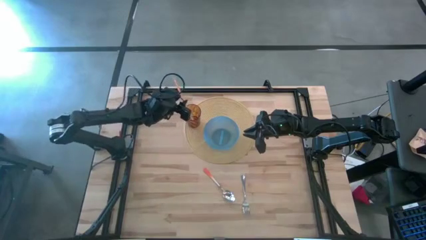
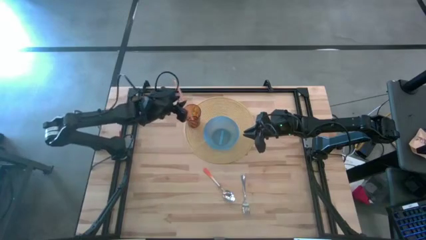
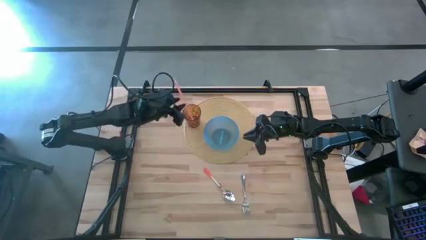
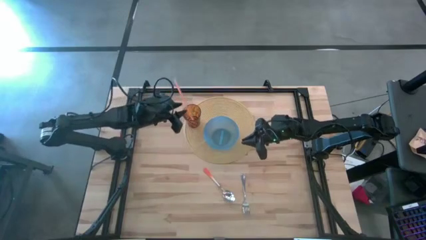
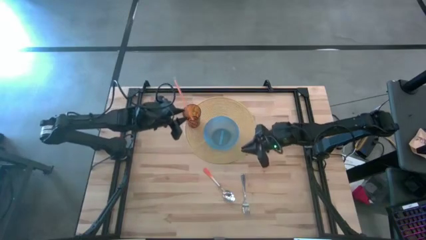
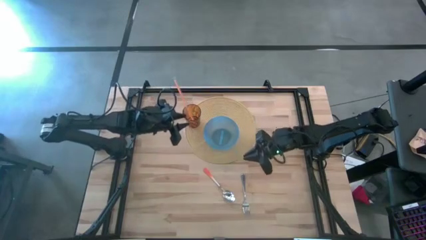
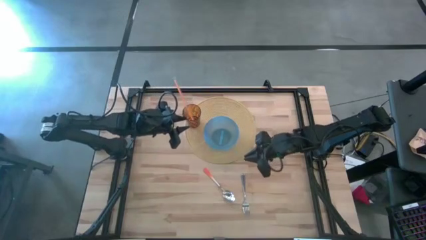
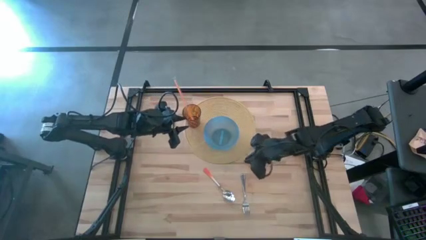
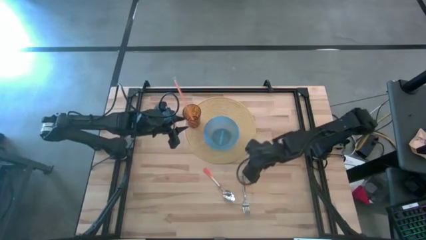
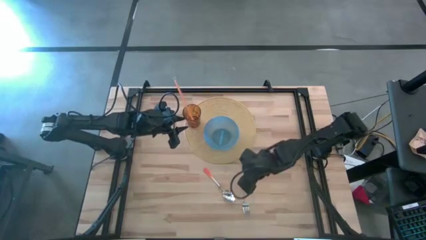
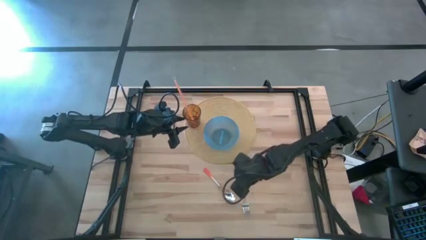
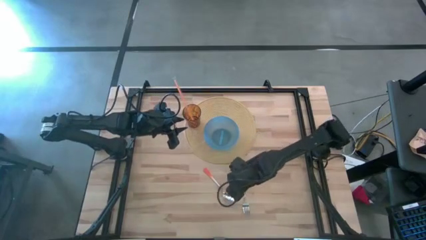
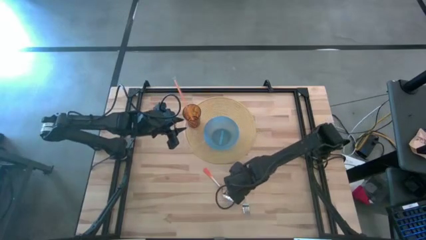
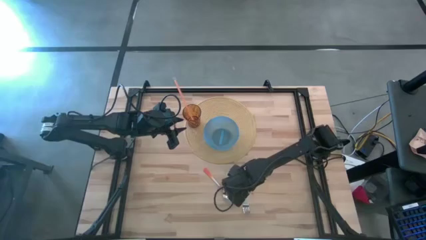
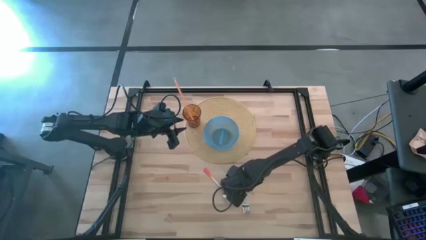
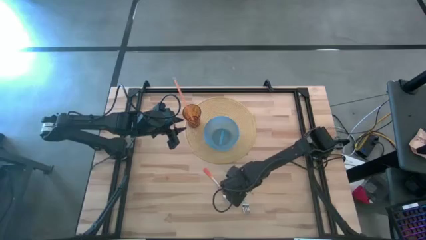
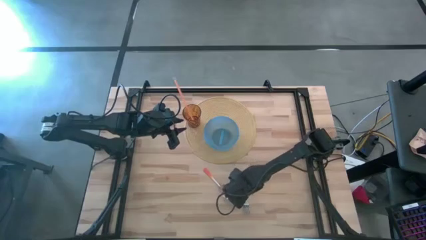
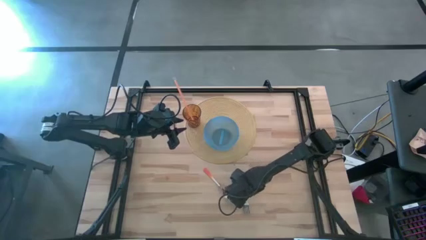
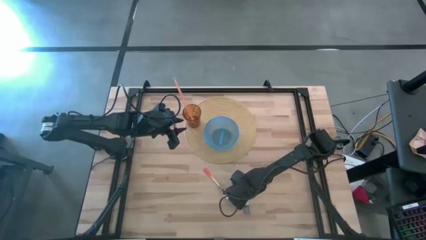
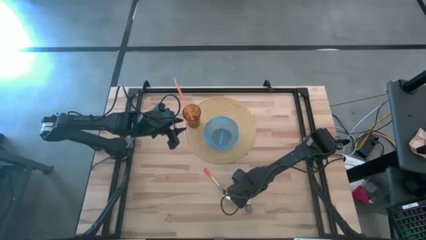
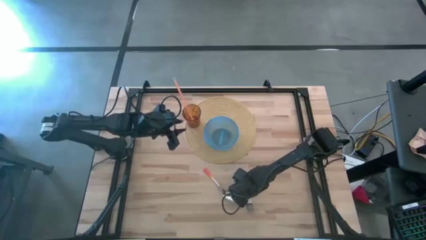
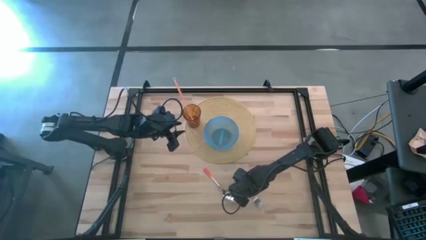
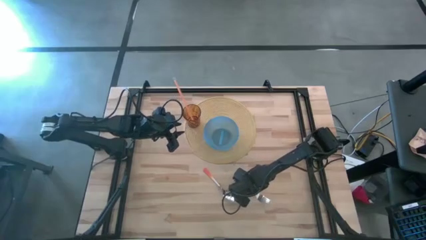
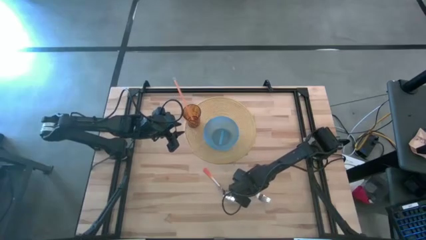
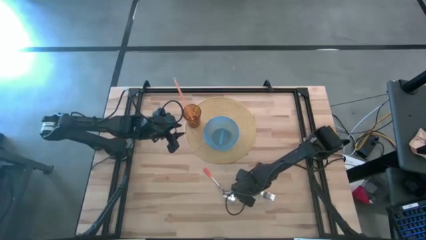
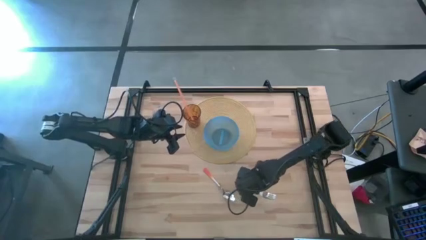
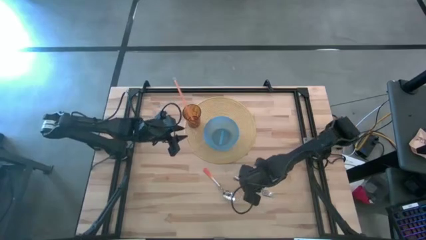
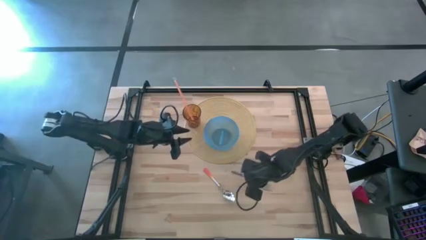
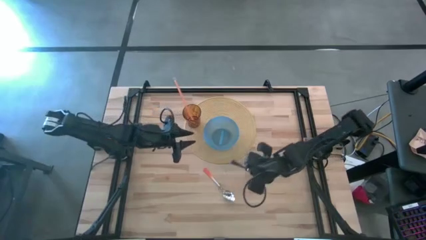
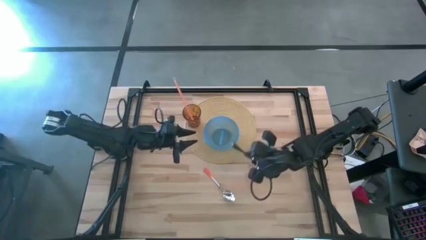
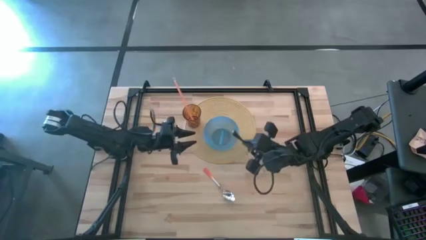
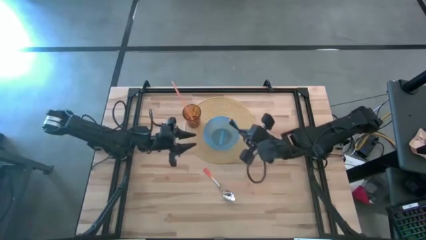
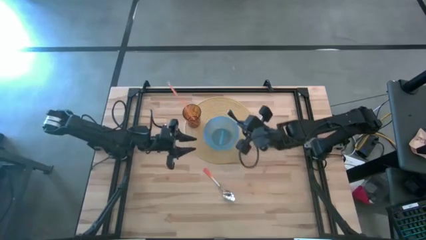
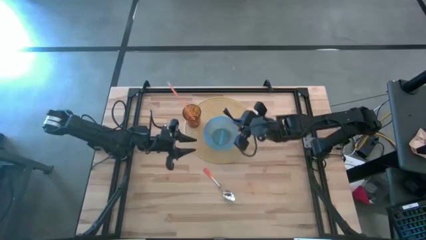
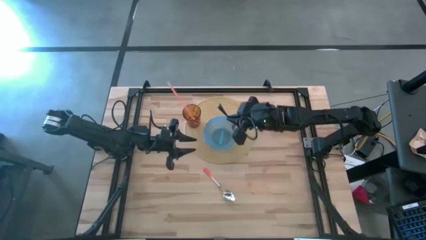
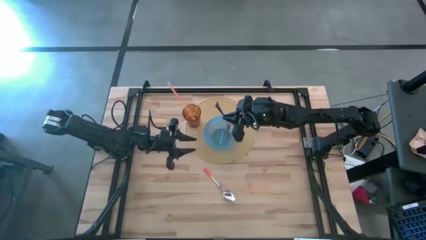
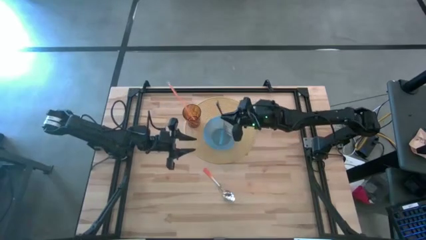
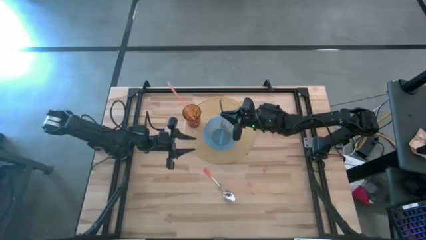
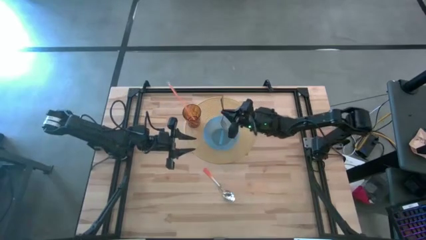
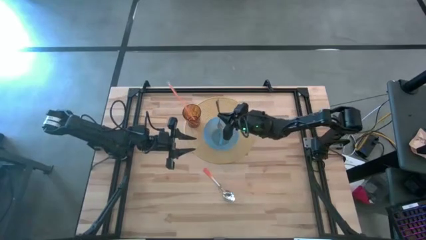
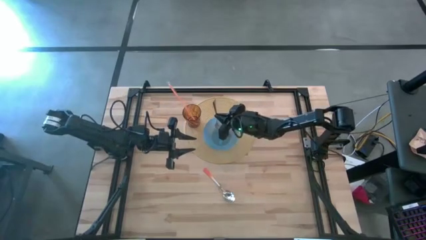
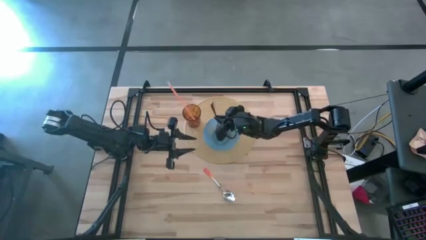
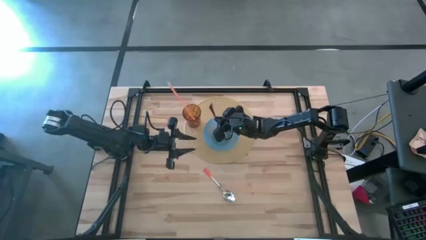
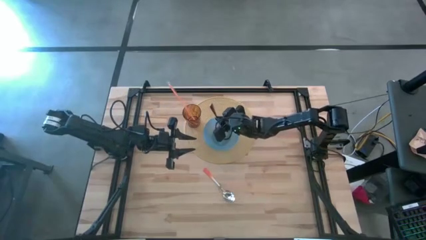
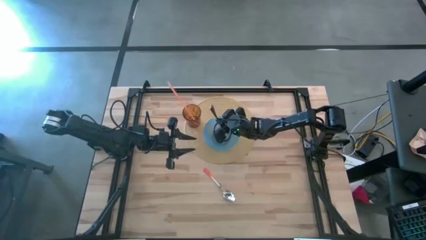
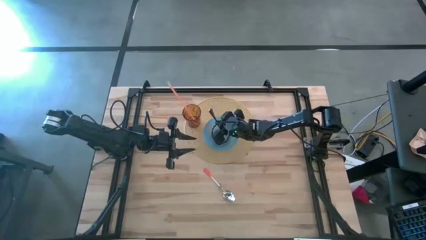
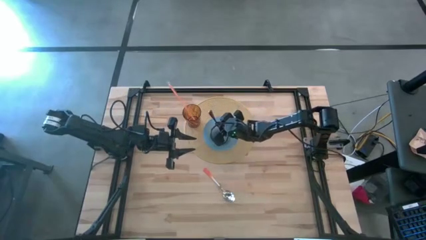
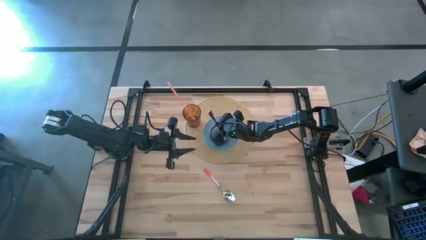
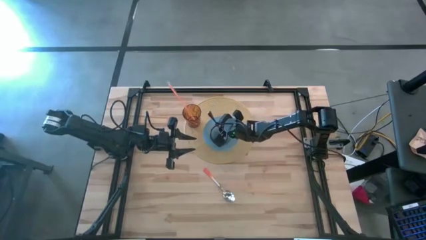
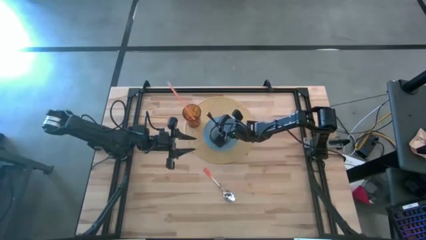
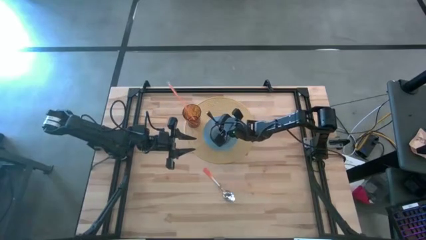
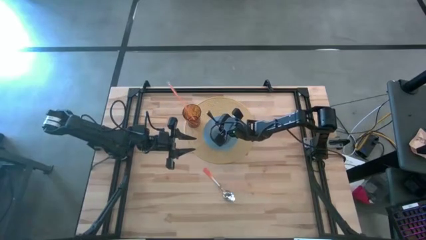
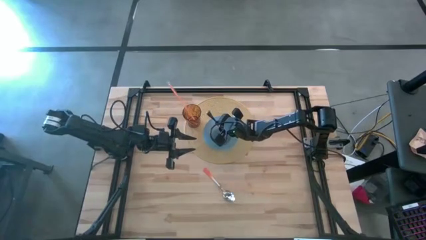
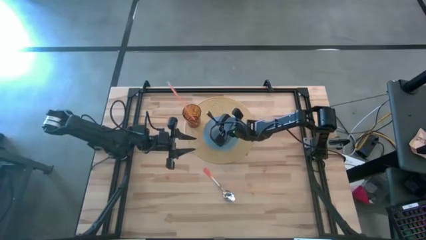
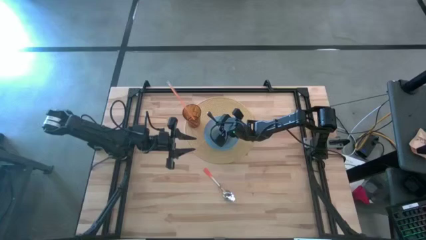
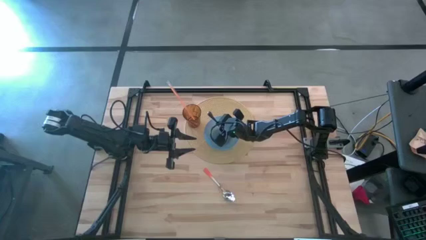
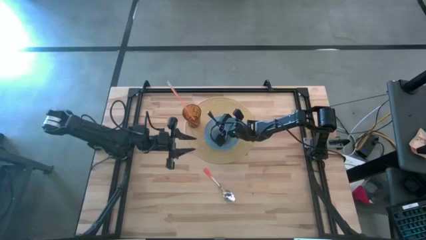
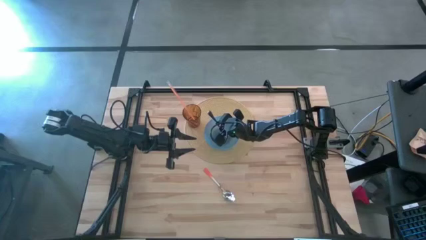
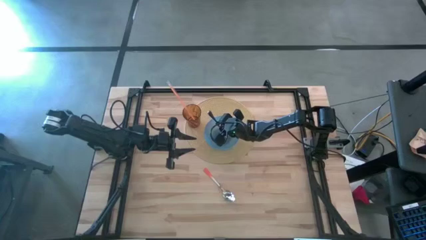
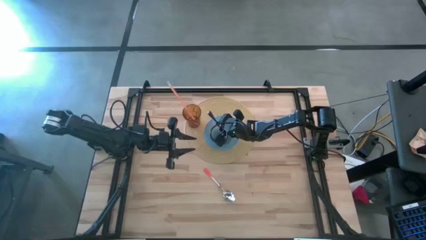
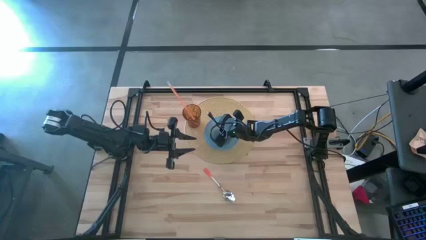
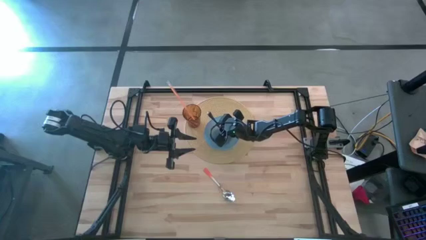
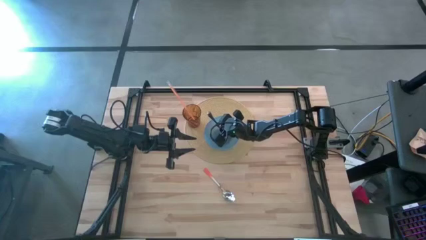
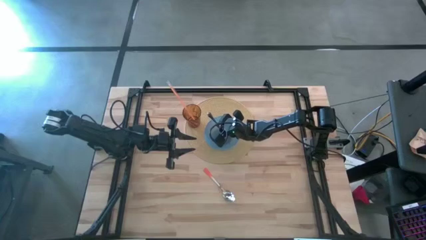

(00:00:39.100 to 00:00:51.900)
Task: Pick & Place Utensil
Put the silver fork into the blue bowl on the brown mat

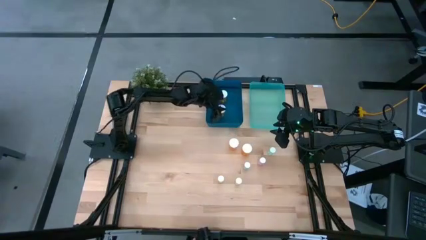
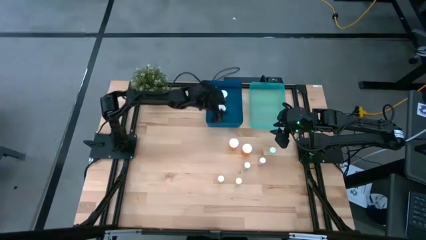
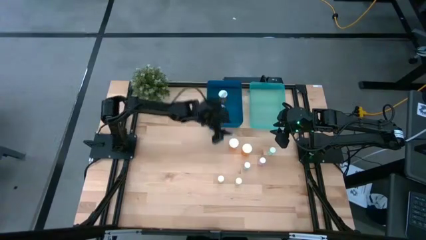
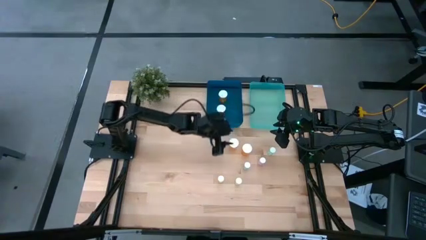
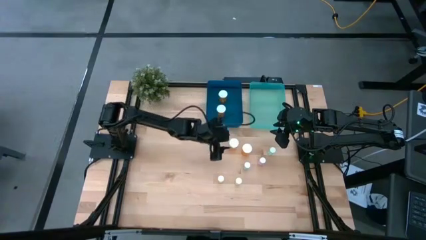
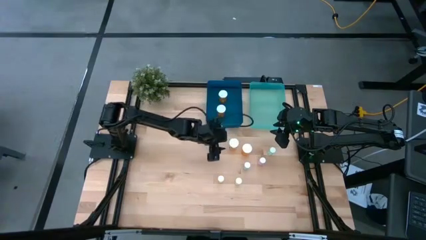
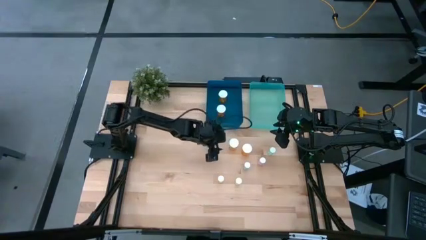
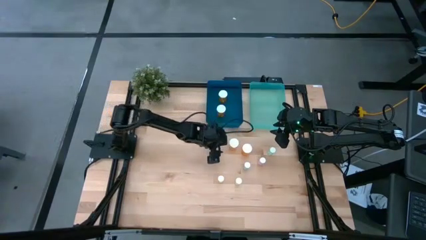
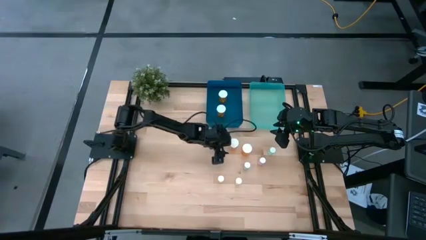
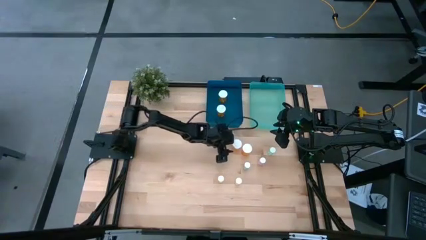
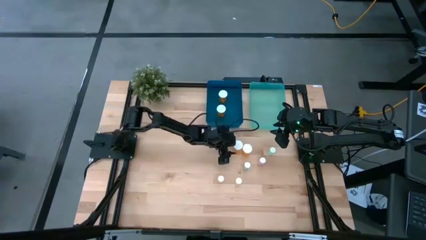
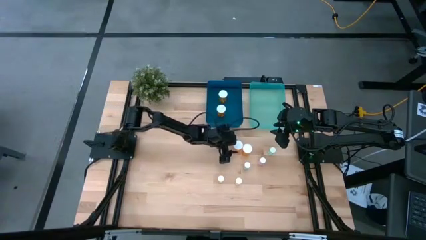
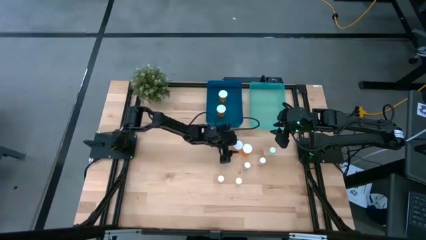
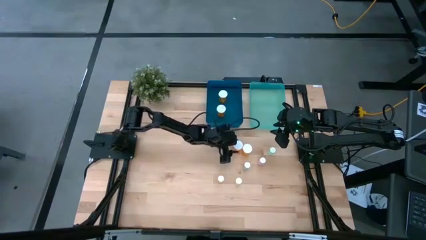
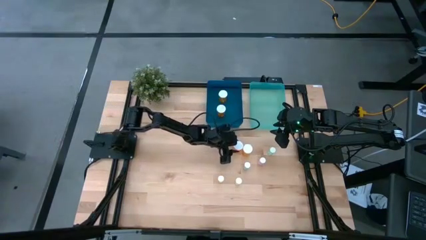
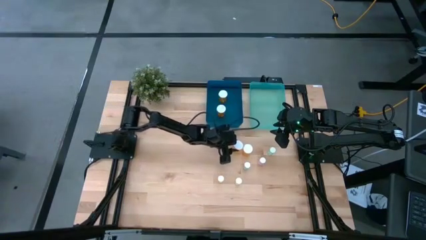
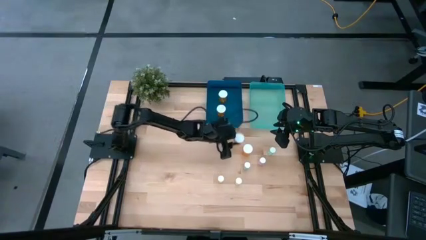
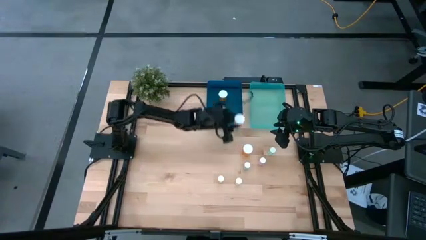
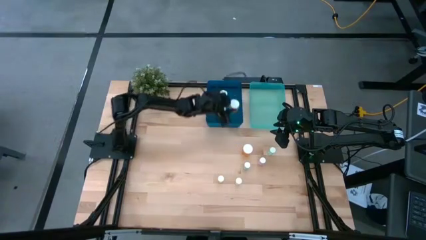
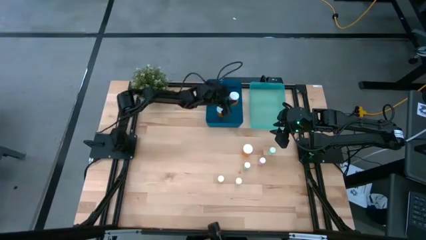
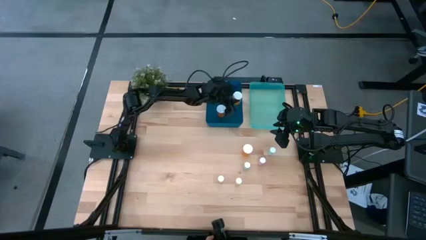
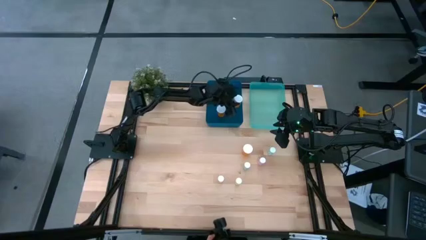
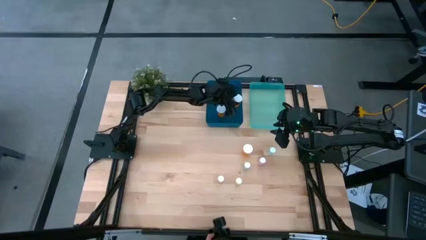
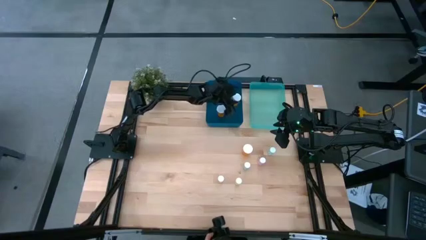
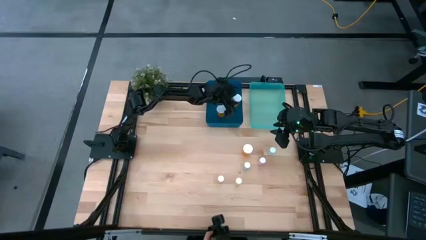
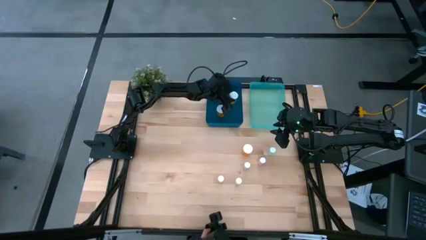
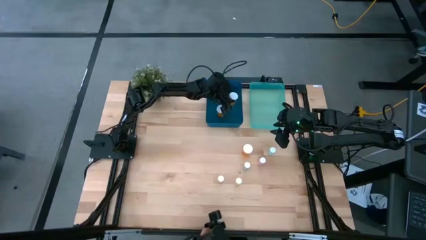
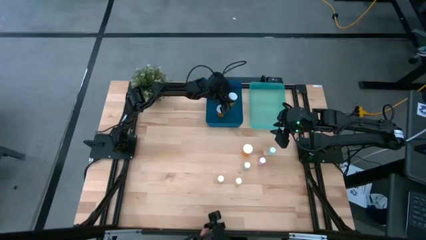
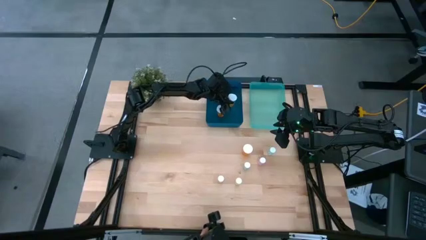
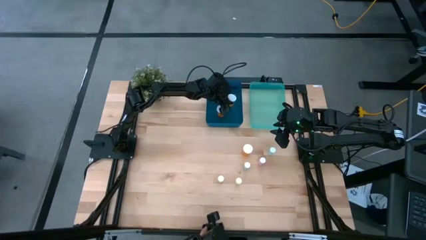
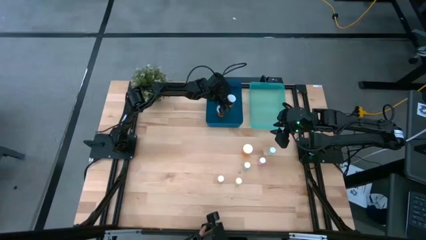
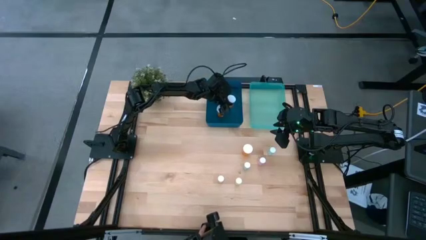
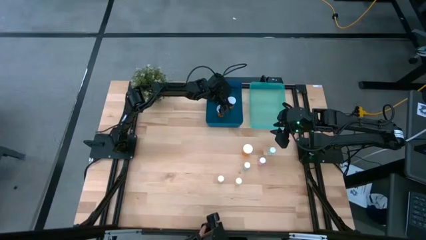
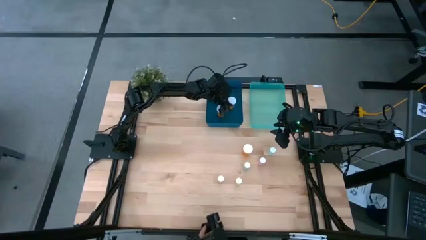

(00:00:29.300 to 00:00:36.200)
Task: Pick and place medicine bottles into bin by pill shape (circle, oval)
Put the large orange medicine bottle into the blue bin
